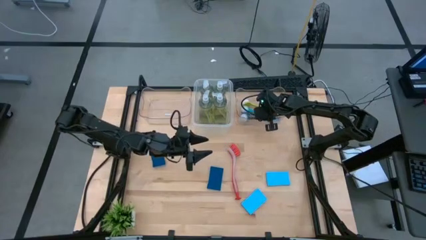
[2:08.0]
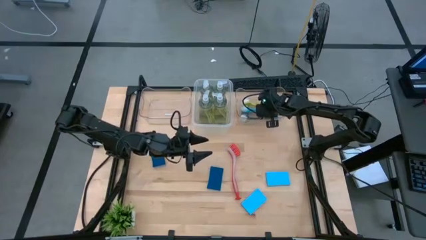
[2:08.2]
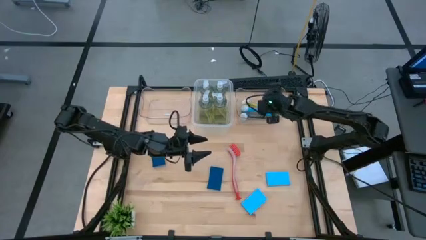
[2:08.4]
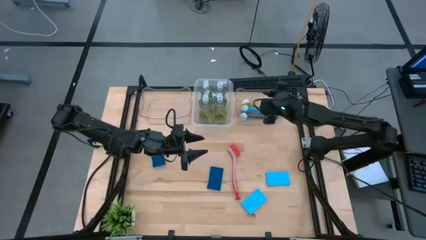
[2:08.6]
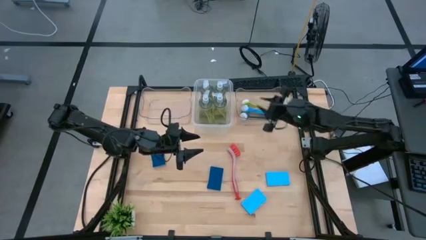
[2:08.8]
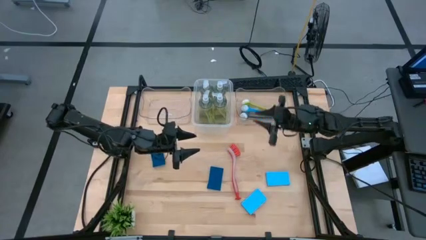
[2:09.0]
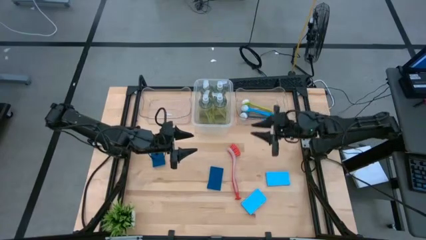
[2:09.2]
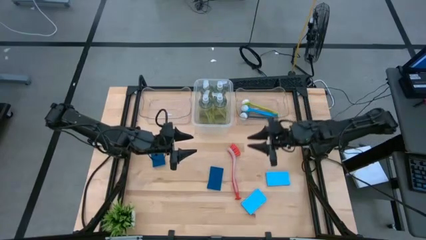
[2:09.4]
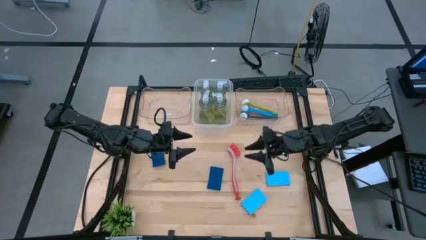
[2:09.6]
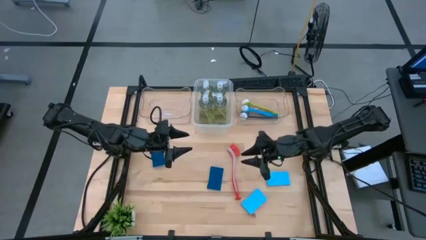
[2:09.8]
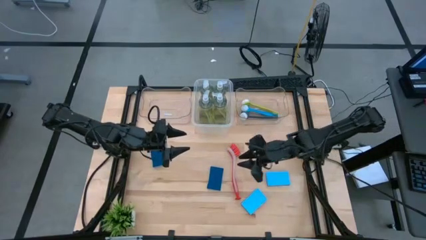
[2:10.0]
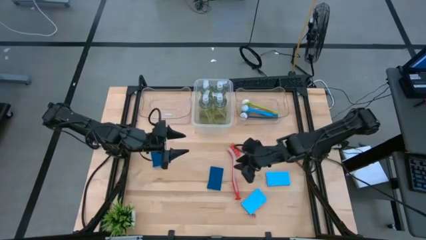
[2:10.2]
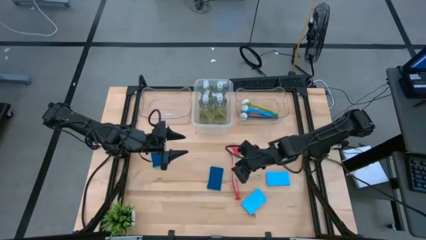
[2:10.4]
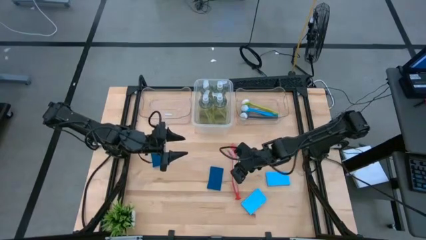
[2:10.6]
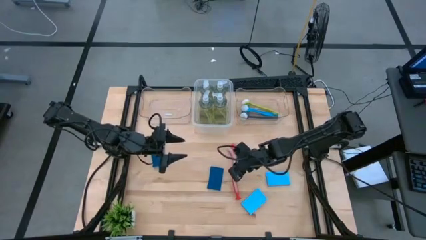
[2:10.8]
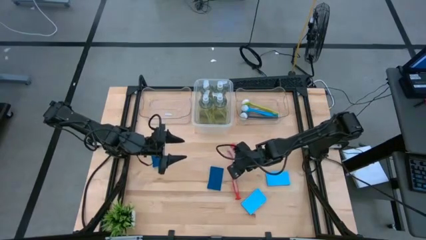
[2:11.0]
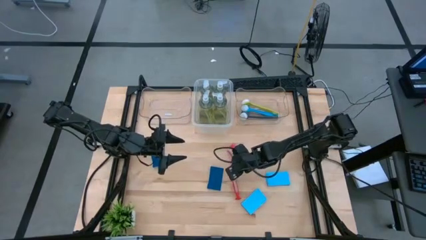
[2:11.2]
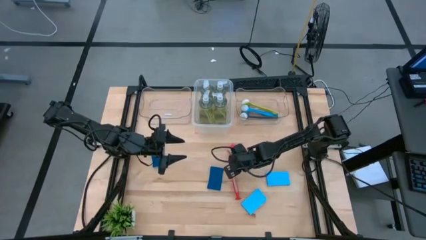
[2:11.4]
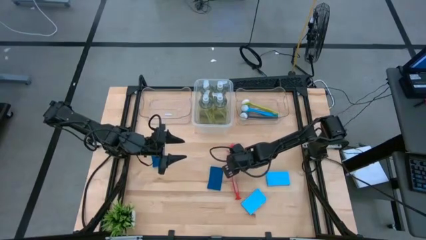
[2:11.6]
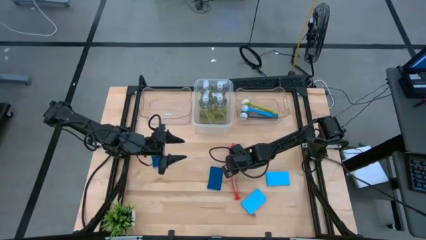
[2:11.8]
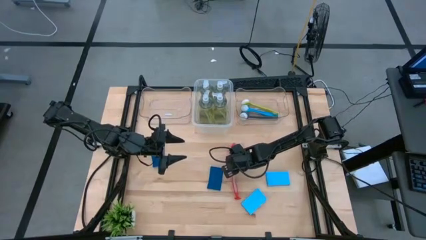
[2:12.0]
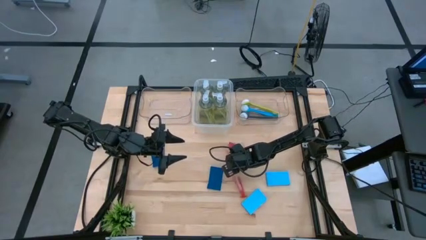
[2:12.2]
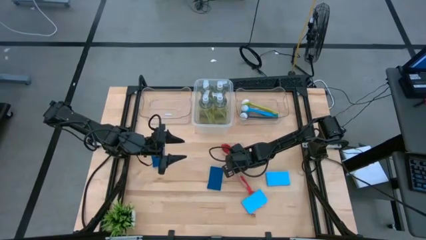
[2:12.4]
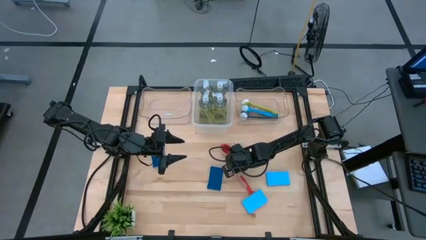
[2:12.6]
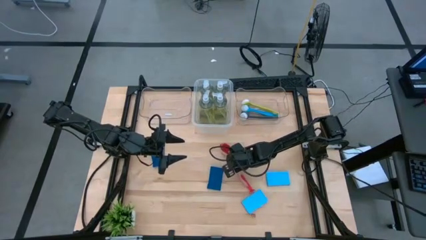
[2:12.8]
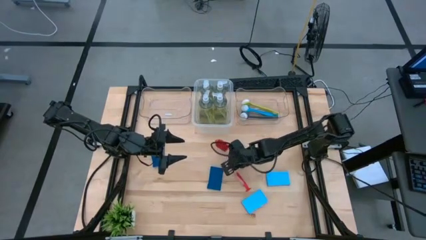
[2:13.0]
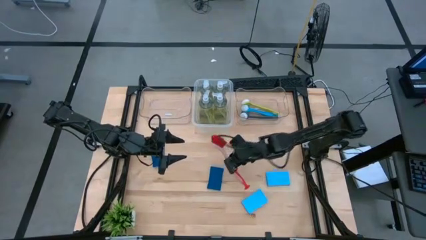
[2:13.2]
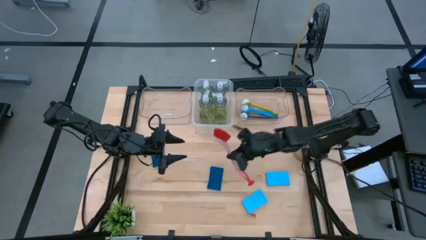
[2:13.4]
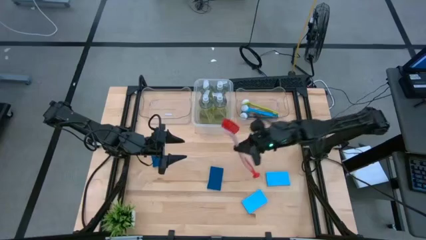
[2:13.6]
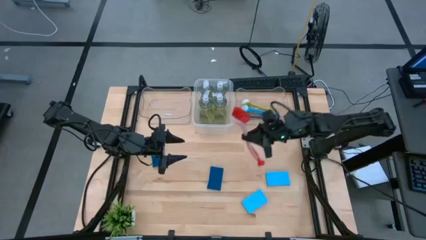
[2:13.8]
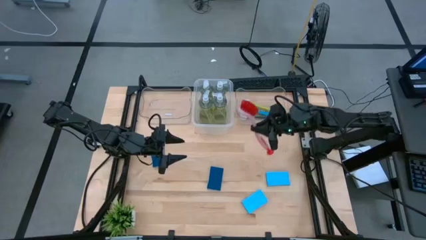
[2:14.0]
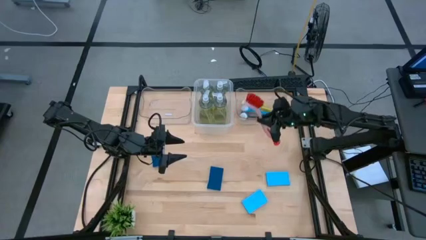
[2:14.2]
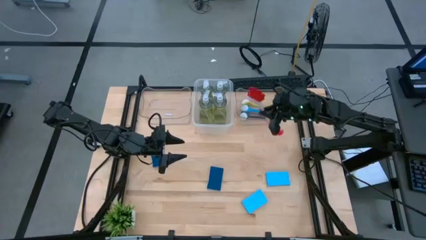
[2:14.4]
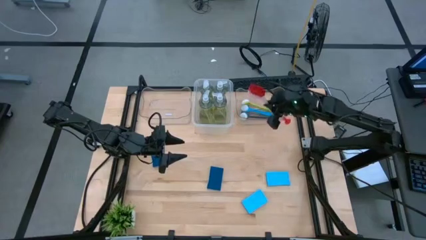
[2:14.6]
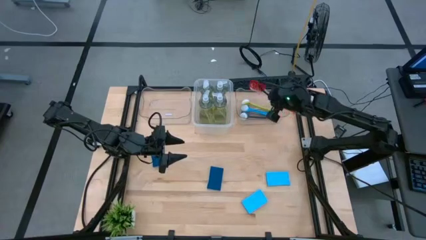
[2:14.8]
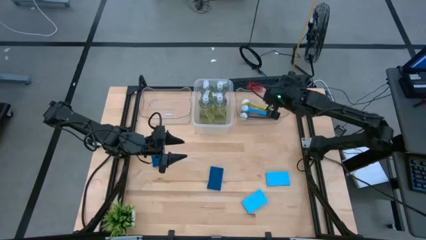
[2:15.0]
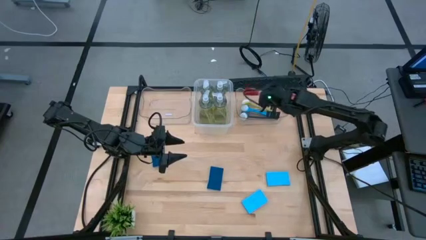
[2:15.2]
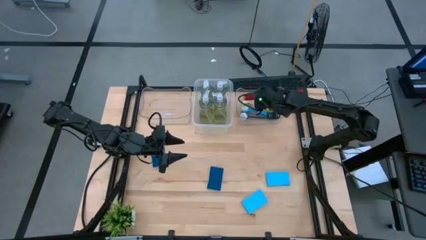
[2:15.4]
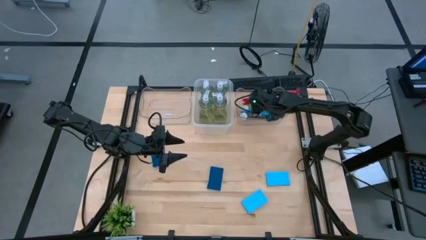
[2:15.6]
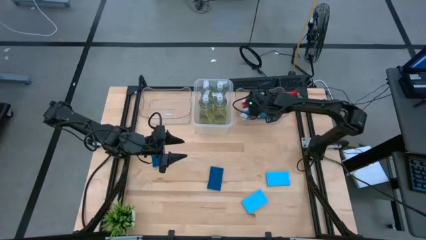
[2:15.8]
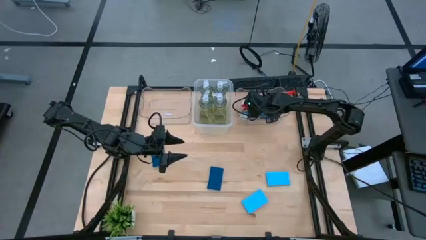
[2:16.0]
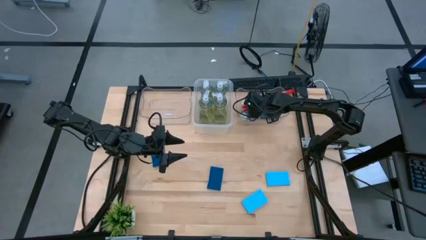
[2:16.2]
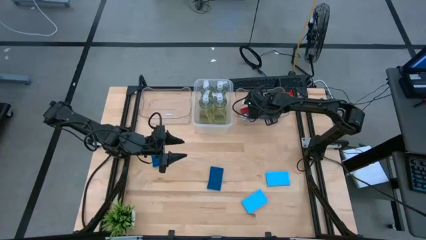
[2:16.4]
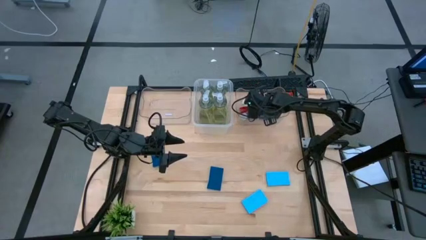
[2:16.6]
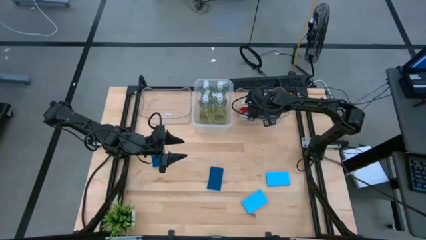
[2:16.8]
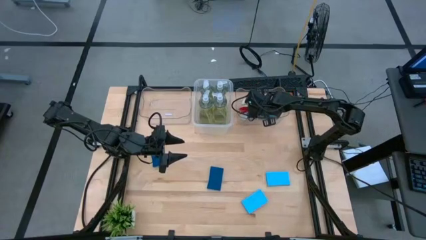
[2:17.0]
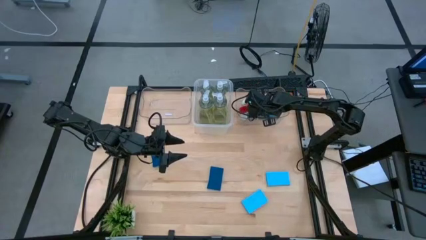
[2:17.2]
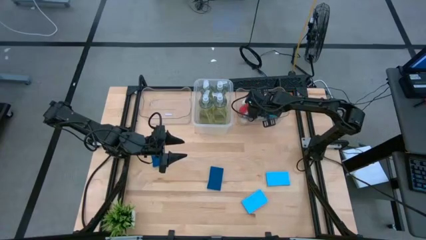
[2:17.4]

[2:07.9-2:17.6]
Task: Pick & Place Kitchen Sink Supplies
Put the red dish brush into the right transparent bin

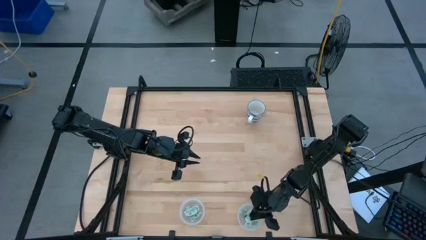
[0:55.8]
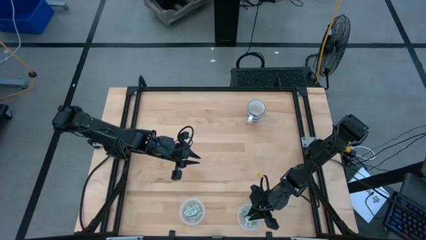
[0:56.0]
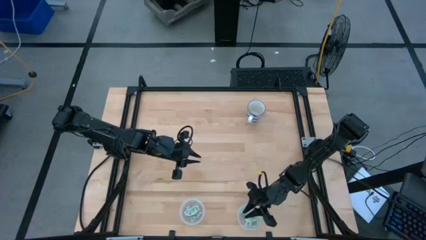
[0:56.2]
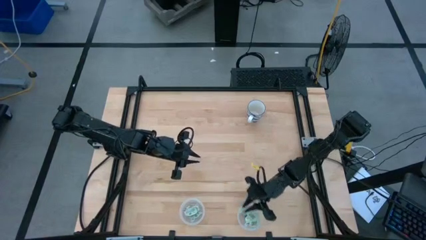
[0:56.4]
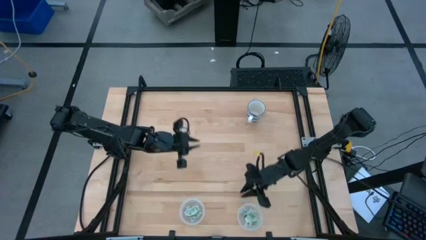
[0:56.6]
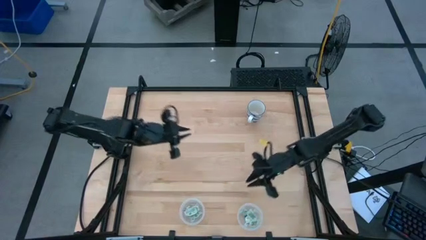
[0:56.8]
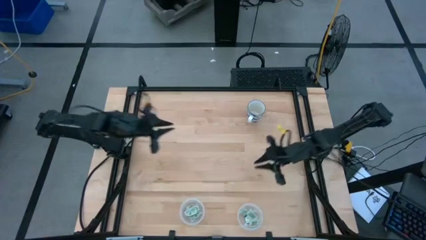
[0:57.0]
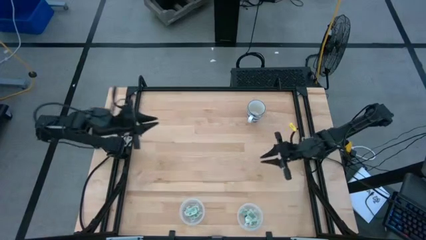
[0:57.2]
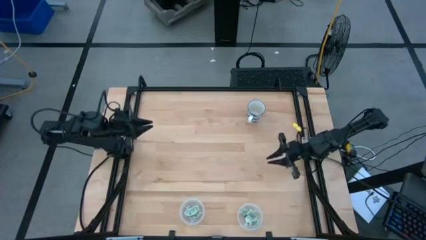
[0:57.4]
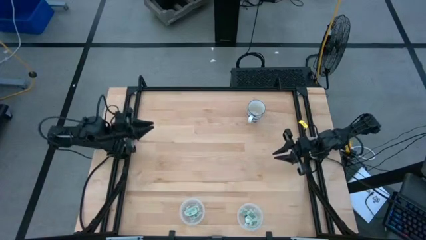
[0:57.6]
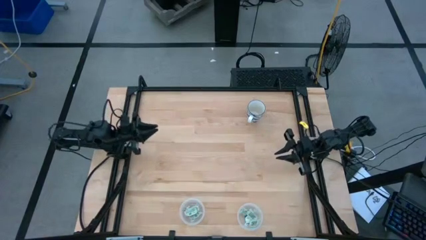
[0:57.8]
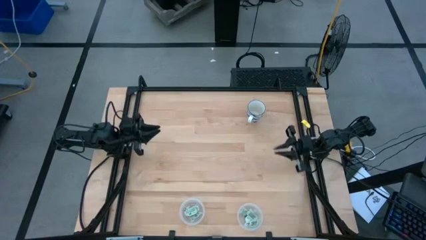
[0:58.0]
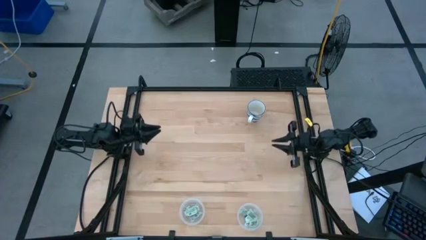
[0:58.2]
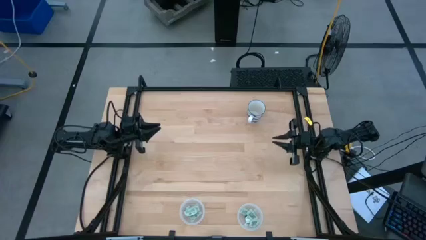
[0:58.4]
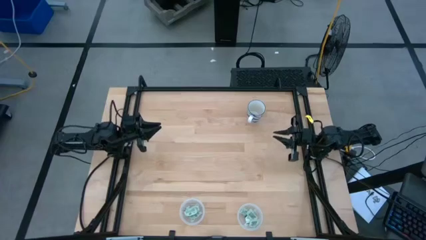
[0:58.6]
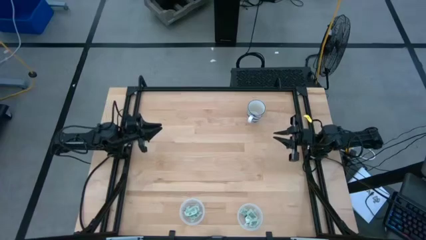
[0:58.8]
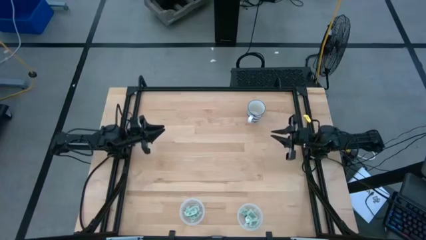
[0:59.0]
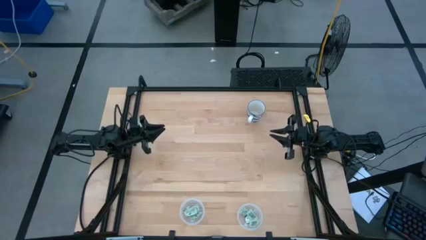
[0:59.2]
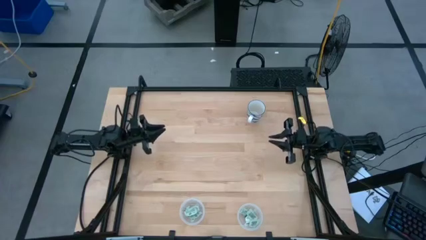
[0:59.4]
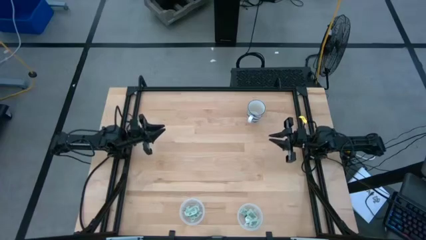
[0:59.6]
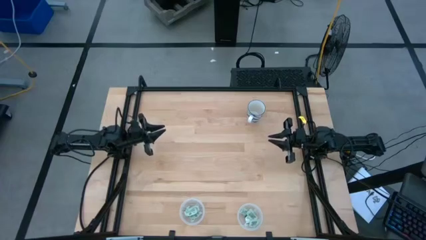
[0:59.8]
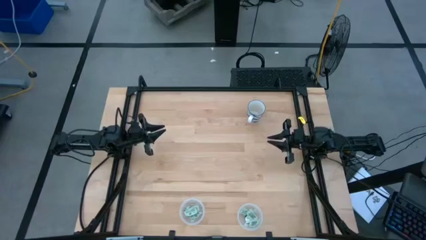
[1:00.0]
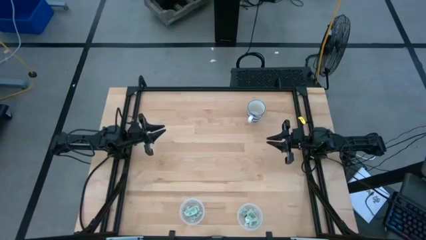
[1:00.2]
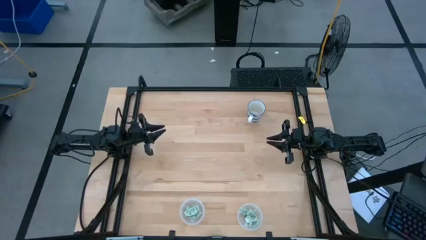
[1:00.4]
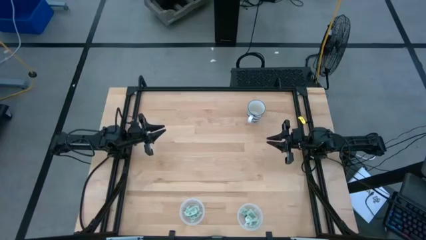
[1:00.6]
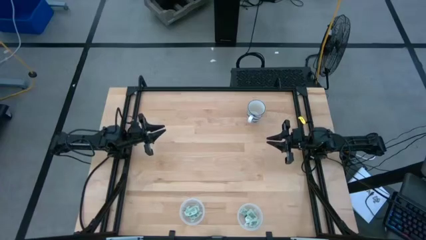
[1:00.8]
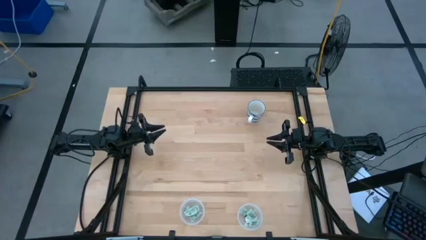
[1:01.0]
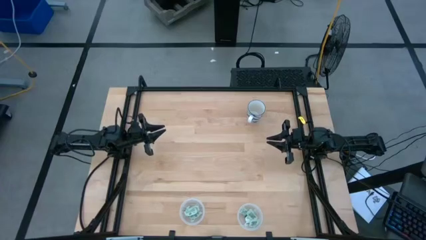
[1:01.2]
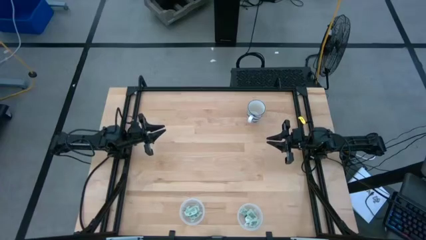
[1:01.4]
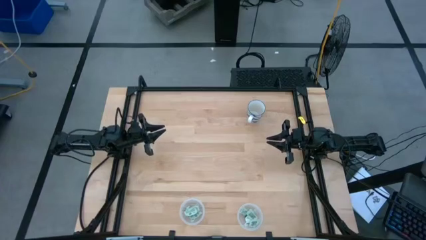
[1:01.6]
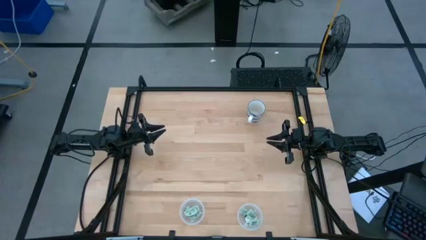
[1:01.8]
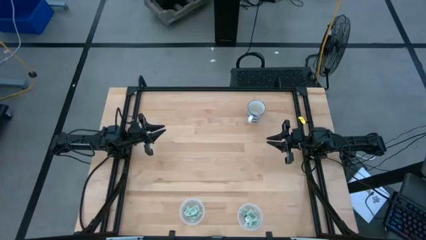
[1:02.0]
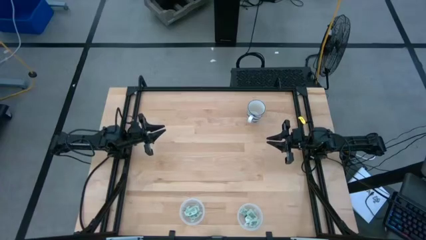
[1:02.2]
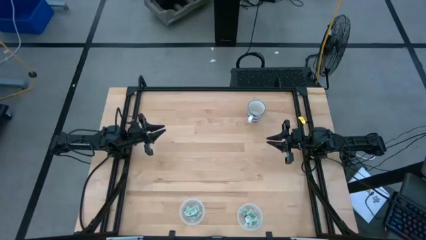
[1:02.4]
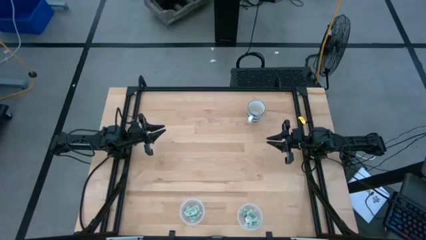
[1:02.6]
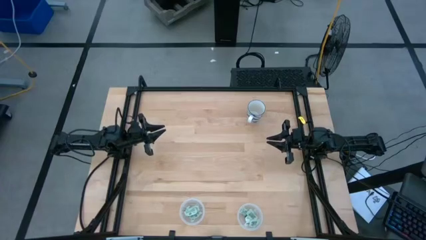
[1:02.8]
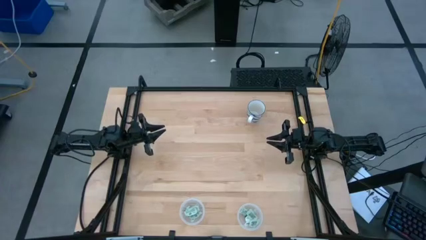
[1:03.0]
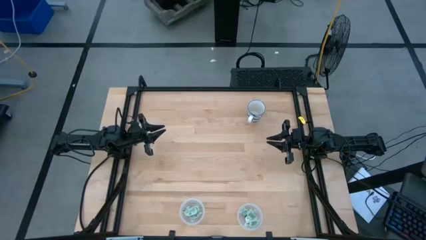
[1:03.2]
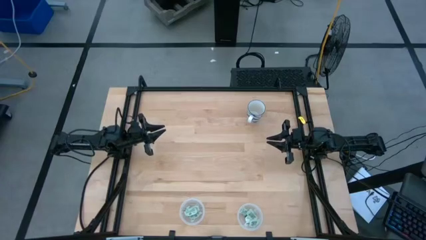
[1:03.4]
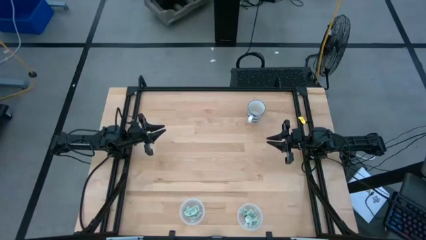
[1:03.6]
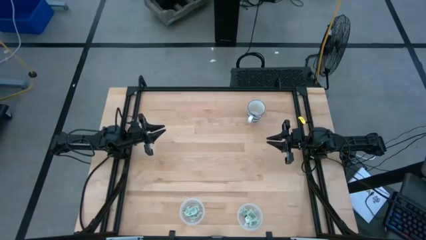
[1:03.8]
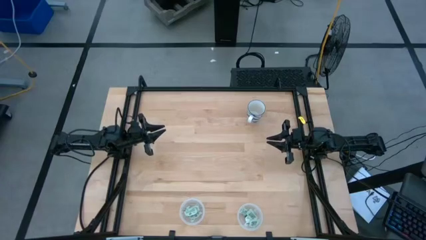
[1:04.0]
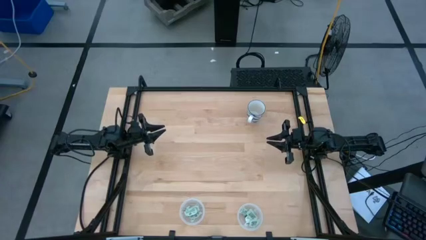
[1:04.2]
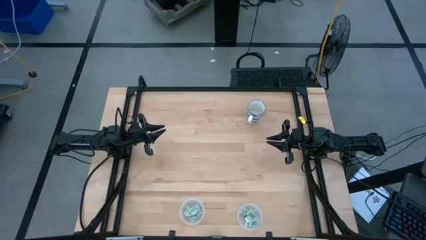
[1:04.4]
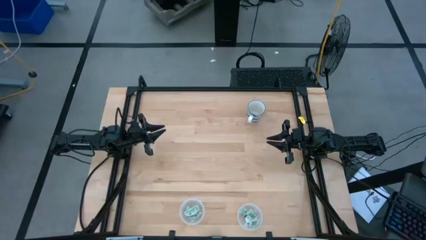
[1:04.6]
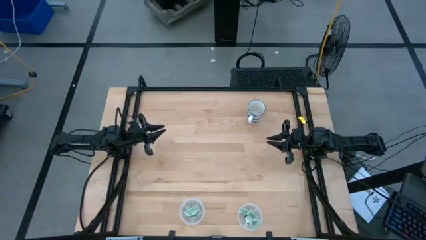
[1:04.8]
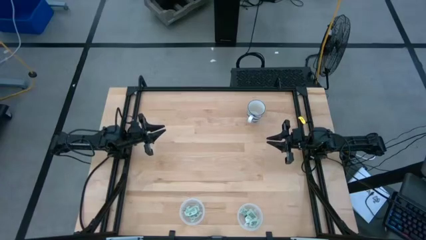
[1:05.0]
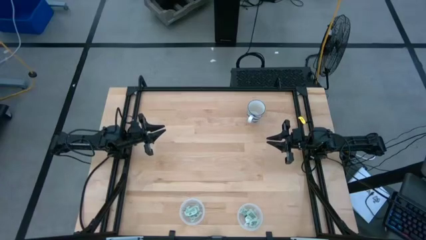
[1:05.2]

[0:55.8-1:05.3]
Task: Pick and place Stevia / Truvia into bins
Return to Home Position
